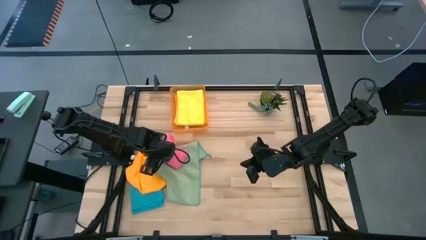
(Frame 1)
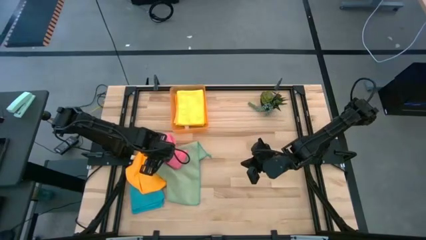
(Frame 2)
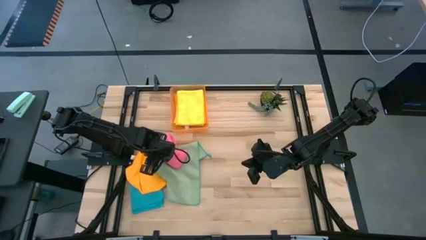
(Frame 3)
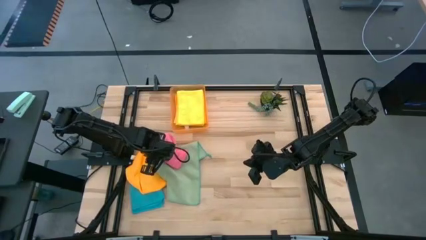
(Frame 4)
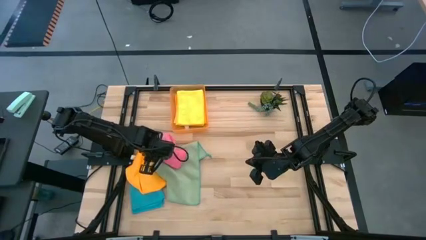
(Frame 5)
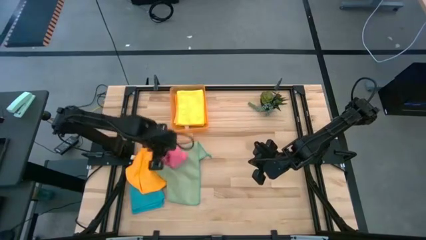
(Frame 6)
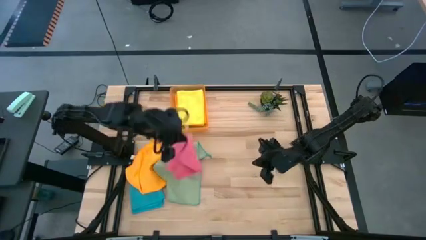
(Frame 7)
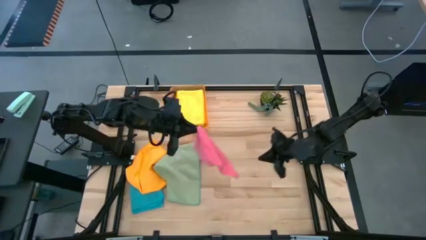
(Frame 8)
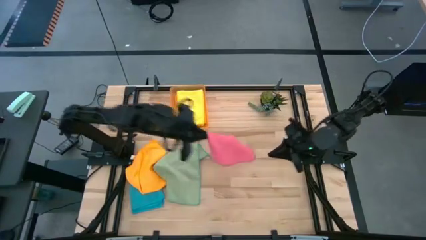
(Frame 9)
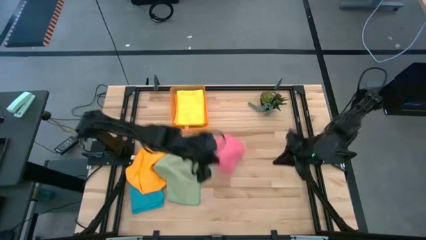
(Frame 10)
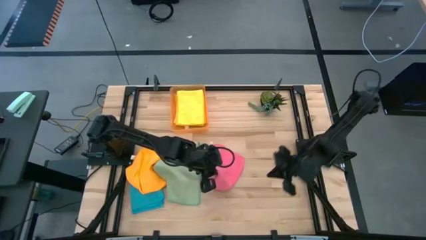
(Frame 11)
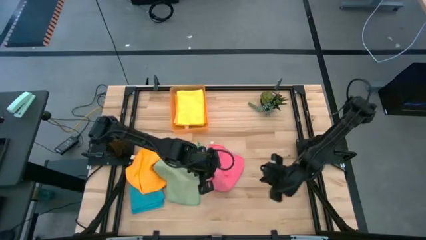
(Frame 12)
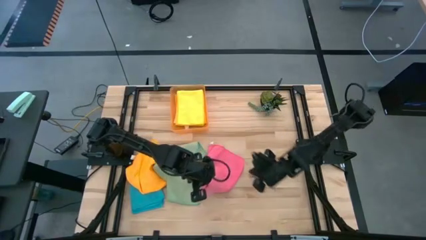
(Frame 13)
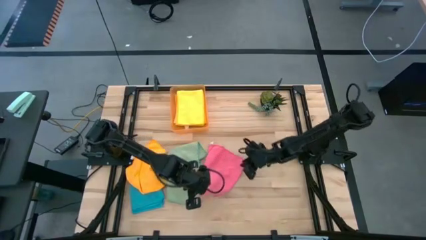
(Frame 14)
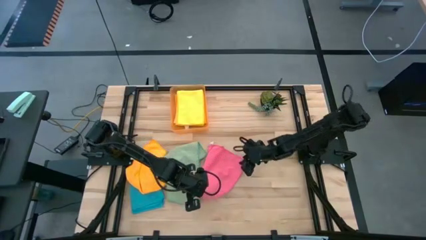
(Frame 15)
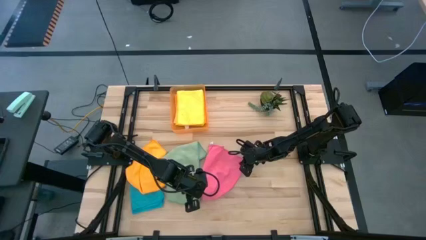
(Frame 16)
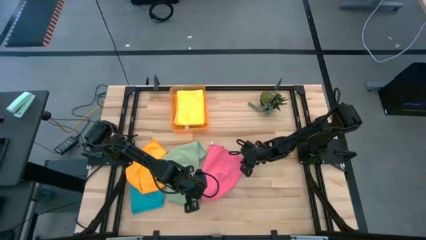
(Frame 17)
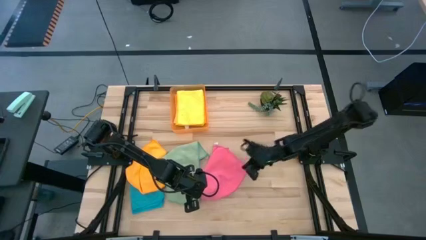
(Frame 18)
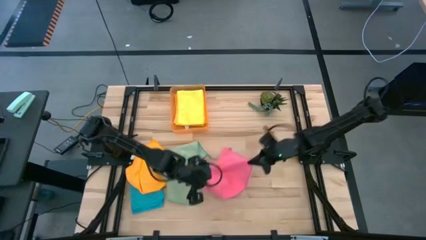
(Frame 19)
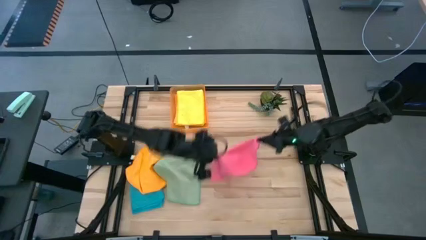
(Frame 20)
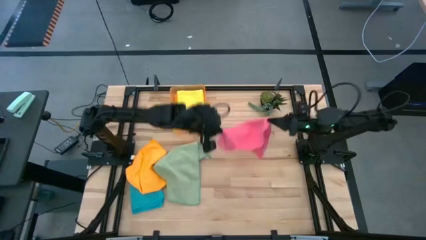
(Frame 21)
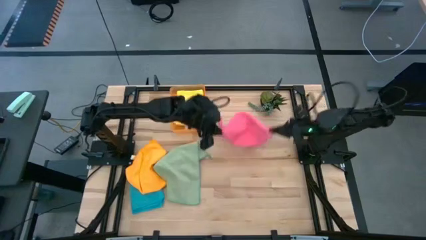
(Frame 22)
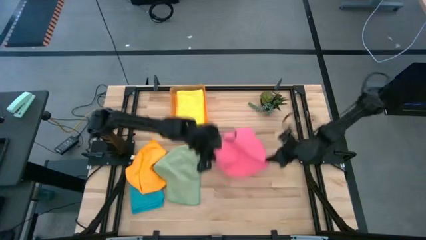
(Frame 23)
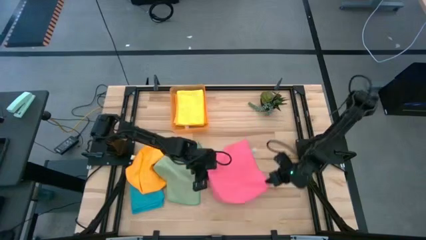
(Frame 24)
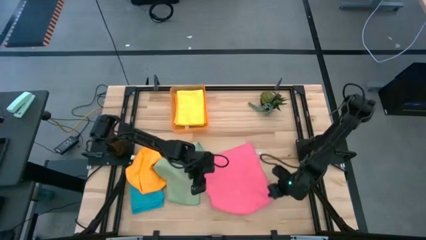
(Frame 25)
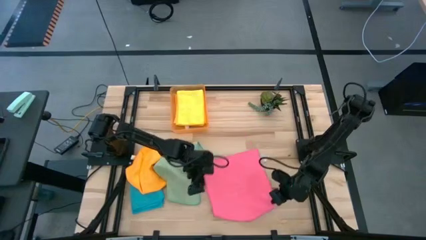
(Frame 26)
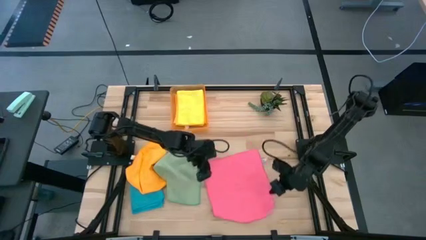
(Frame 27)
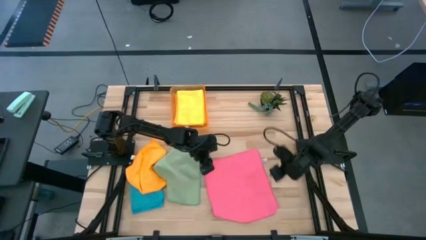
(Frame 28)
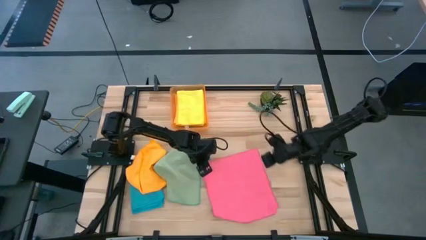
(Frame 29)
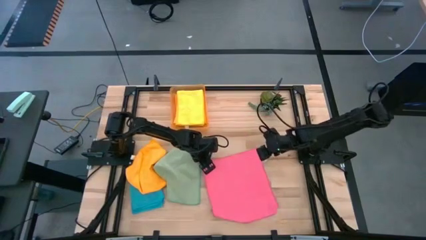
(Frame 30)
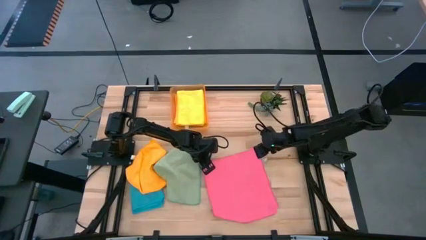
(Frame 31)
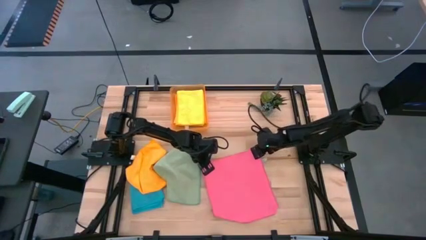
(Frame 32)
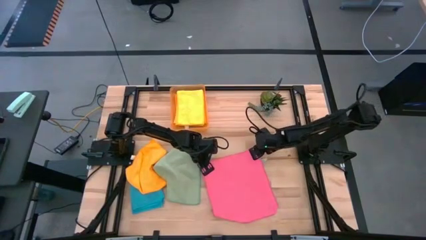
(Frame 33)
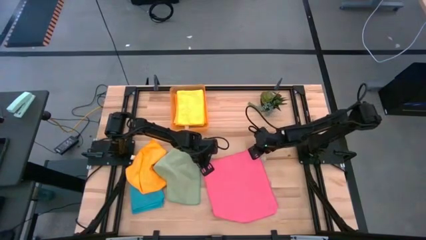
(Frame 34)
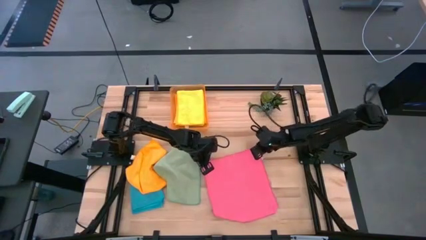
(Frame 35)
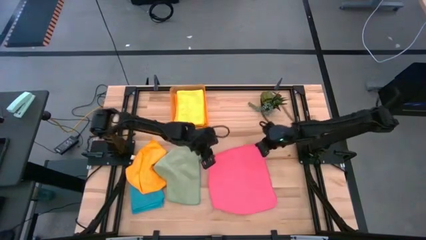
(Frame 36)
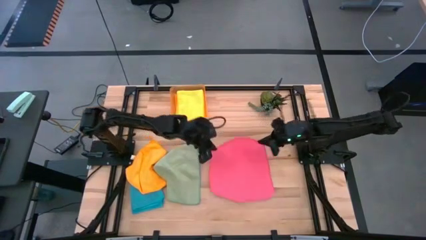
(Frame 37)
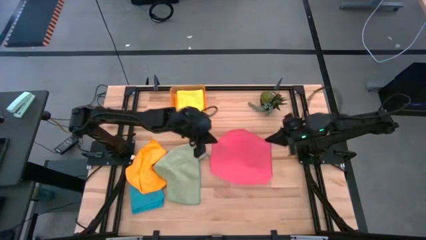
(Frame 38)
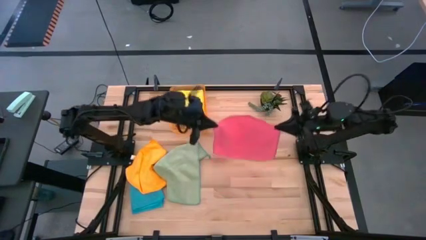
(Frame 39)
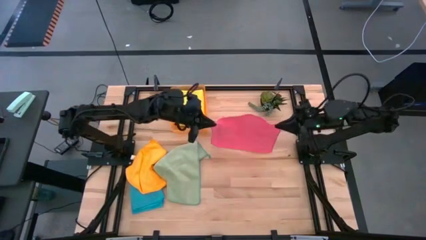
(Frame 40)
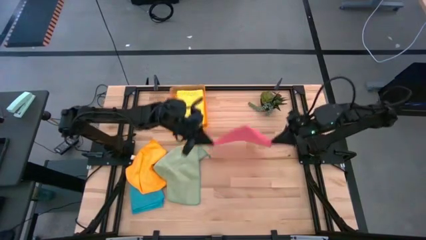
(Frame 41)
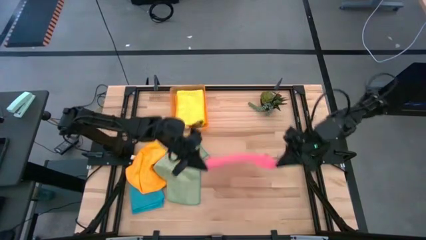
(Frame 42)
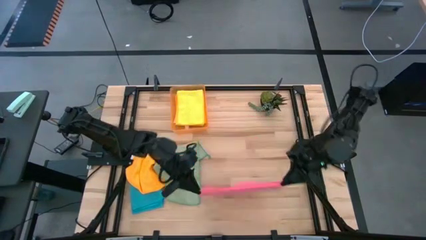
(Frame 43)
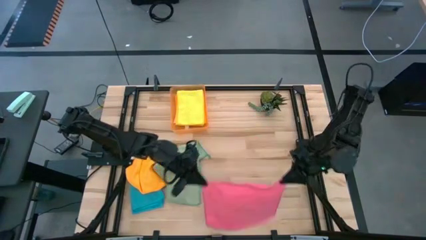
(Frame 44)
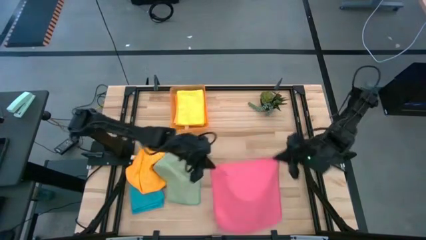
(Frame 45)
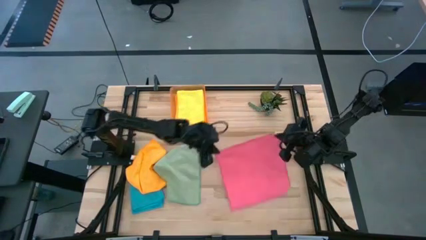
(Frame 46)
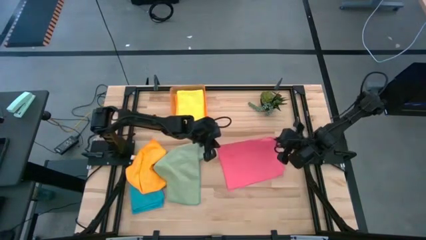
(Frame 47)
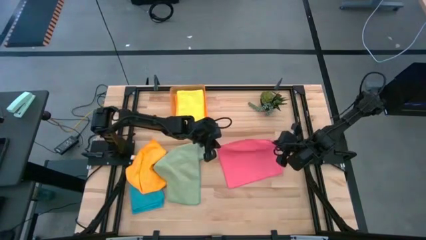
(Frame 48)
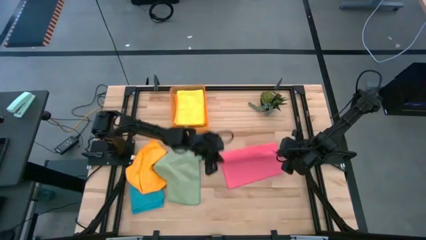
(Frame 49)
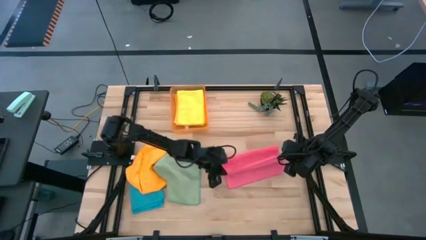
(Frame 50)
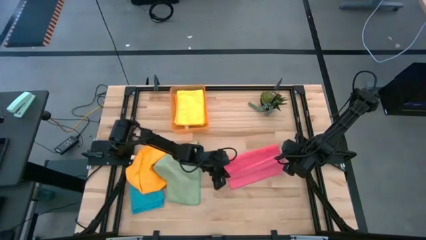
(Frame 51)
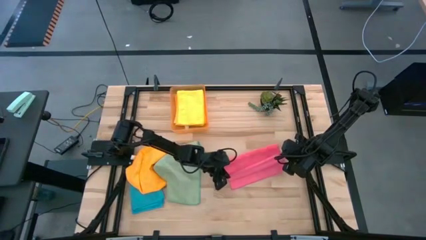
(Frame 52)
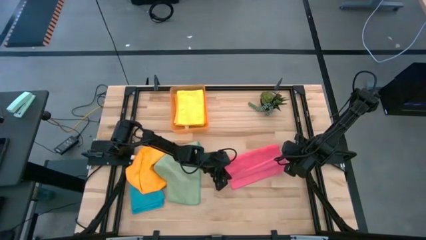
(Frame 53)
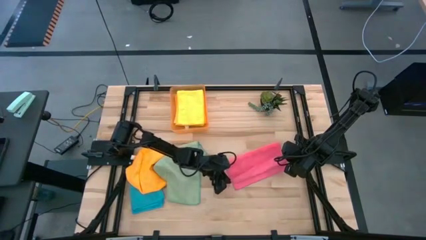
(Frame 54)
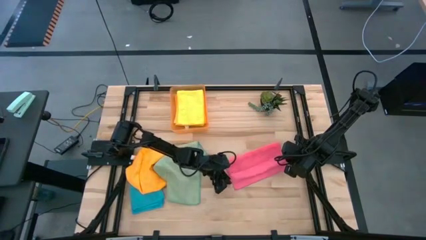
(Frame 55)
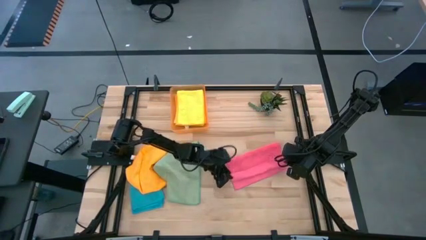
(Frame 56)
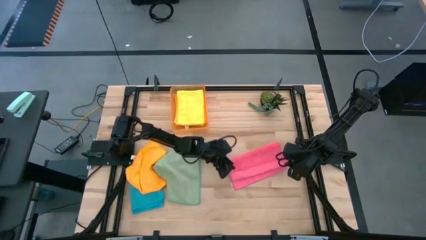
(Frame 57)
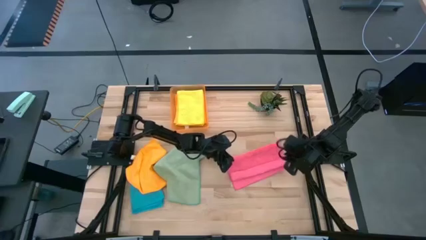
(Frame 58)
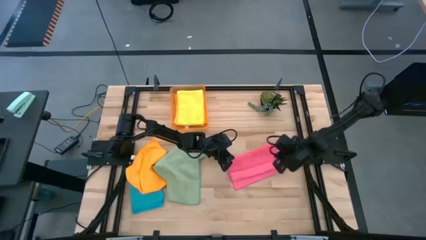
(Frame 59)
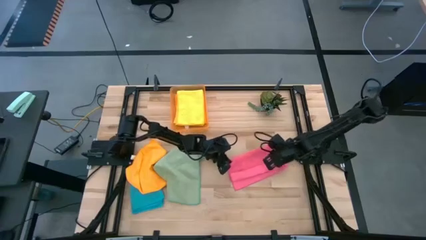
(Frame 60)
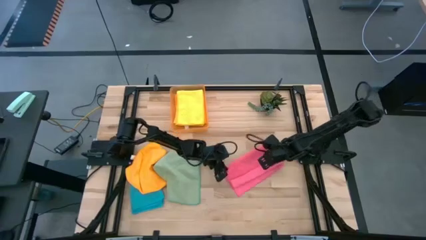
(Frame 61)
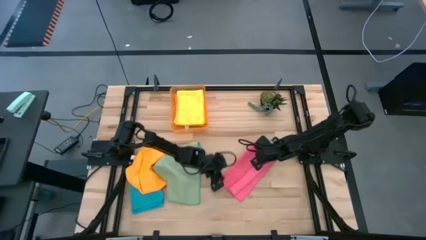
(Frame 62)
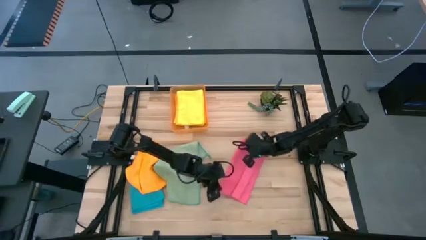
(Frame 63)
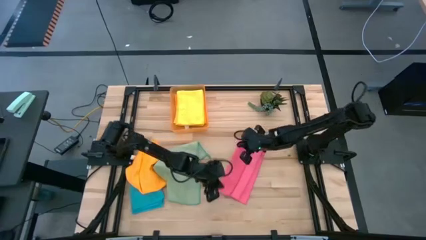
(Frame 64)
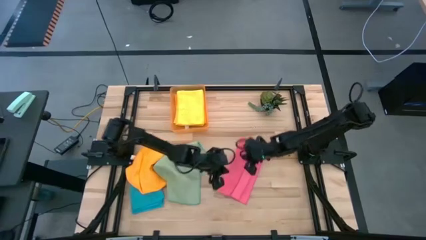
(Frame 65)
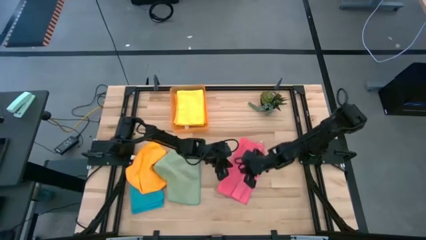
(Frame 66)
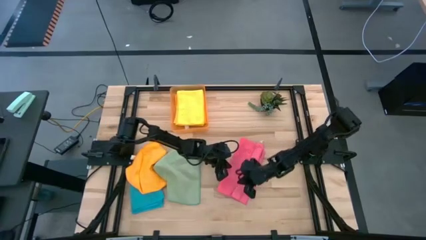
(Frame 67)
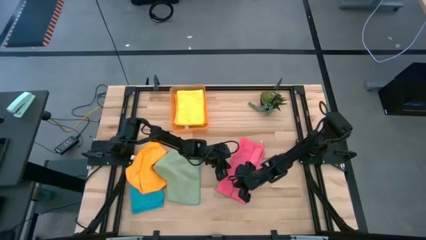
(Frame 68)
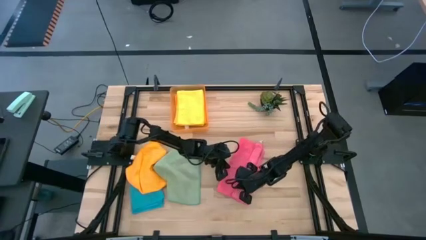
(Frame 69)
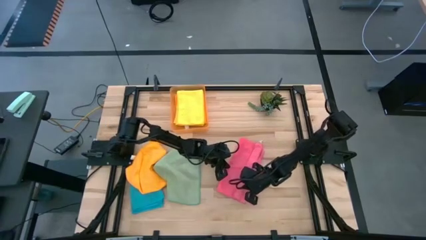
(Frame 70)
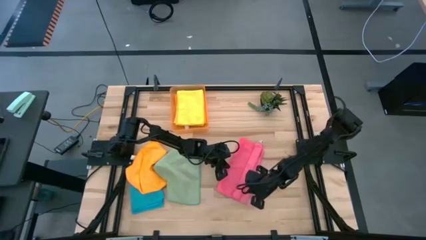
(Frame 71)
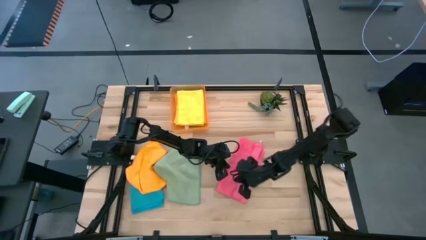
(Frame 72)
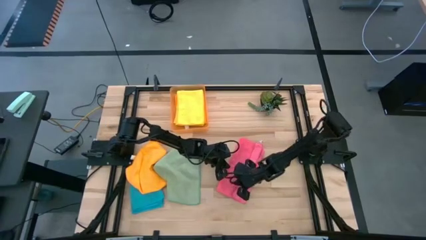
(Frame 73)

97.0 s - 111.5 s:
Task: Fold microfiber towels
Fold the pink microfiber cloth
